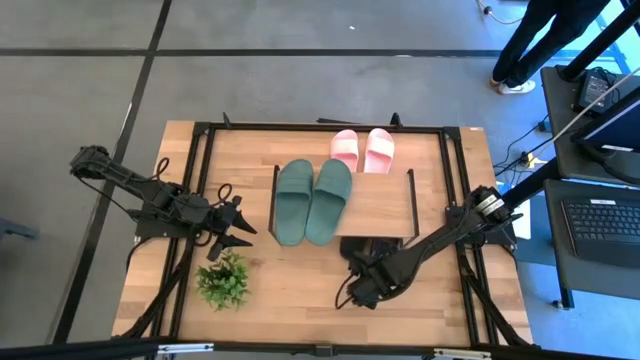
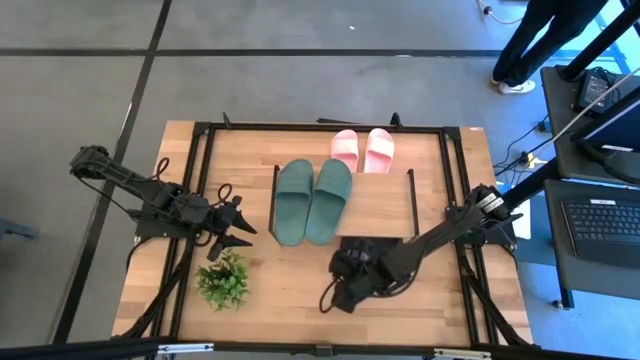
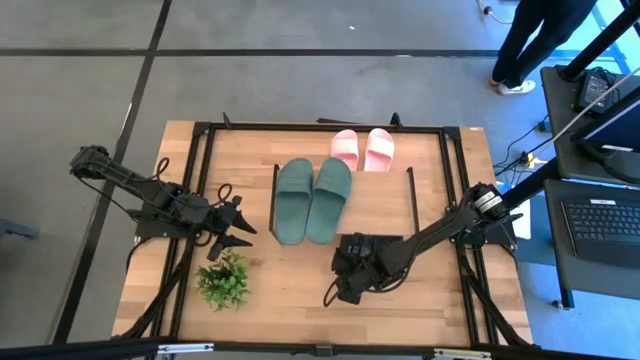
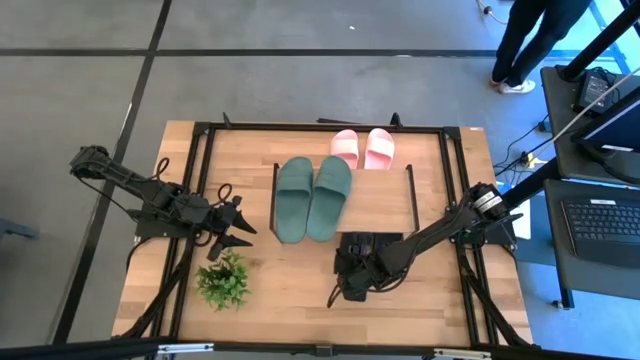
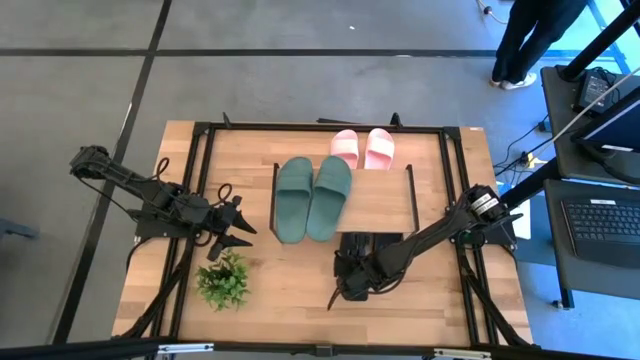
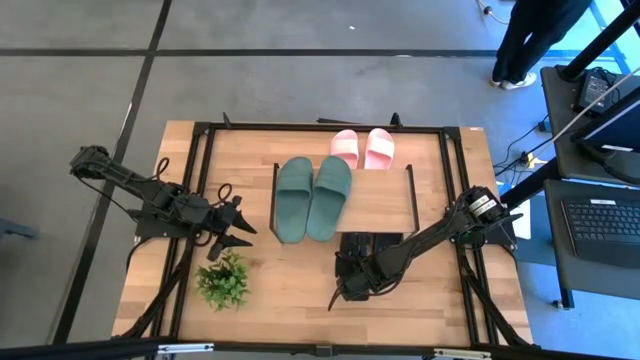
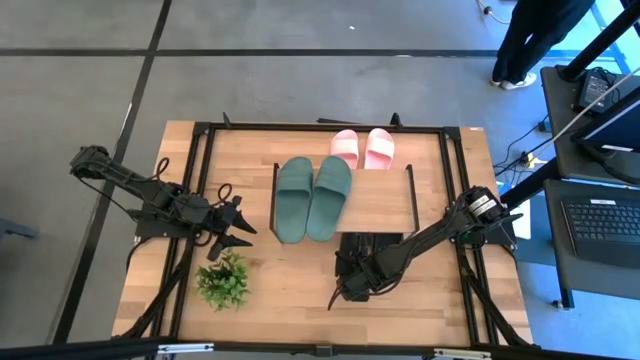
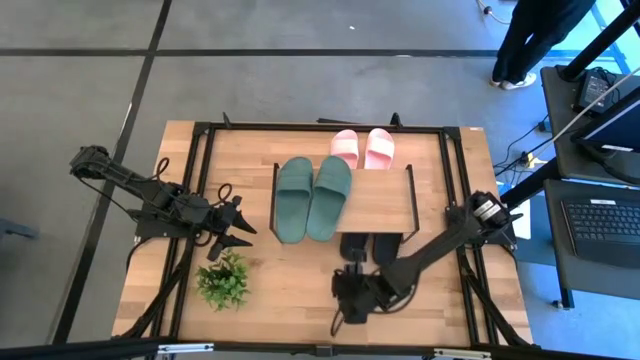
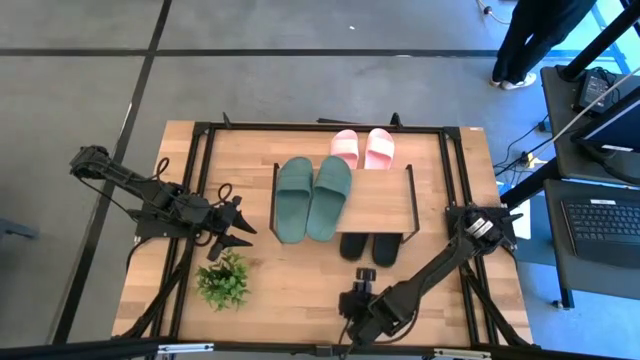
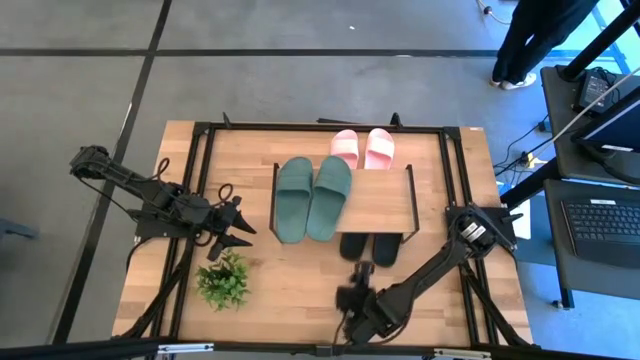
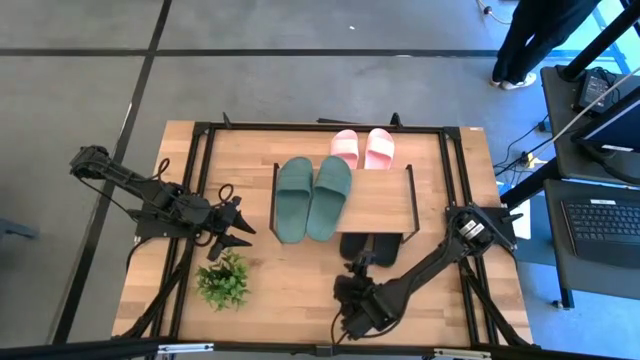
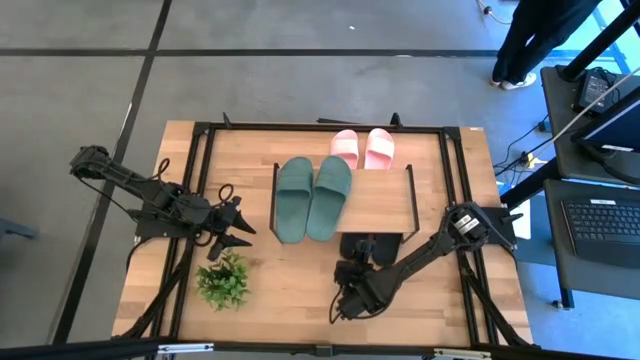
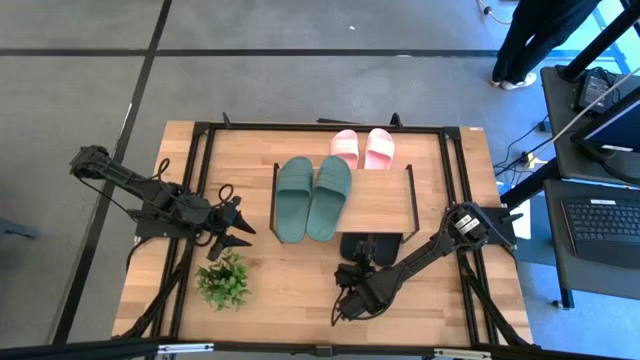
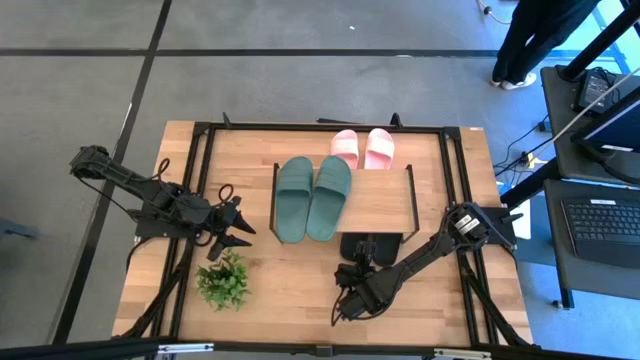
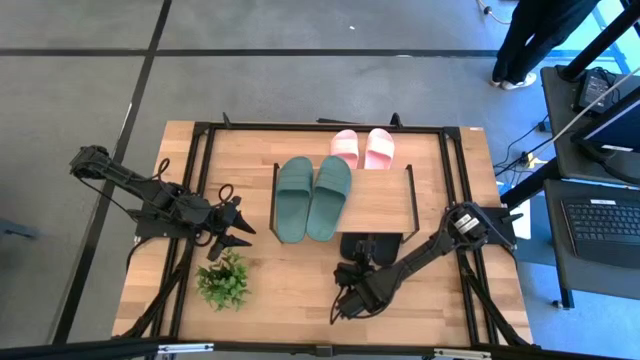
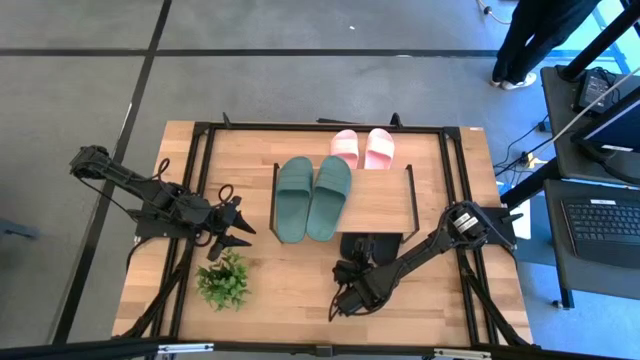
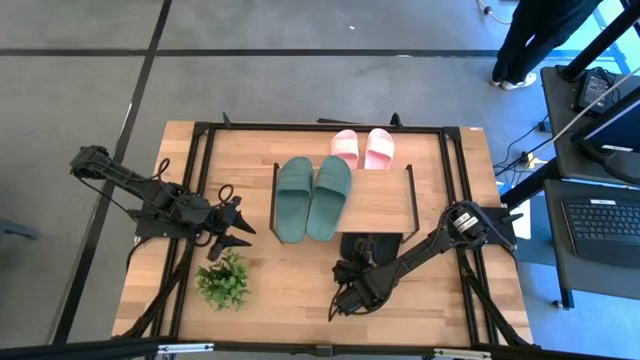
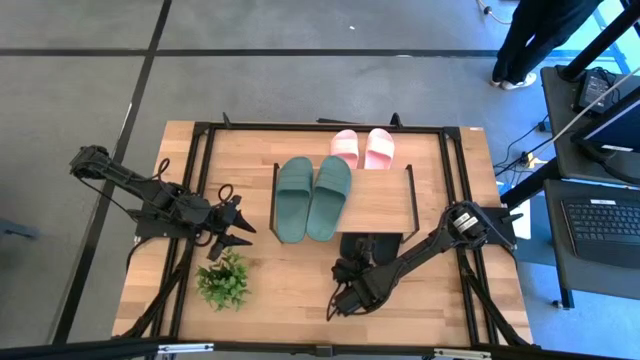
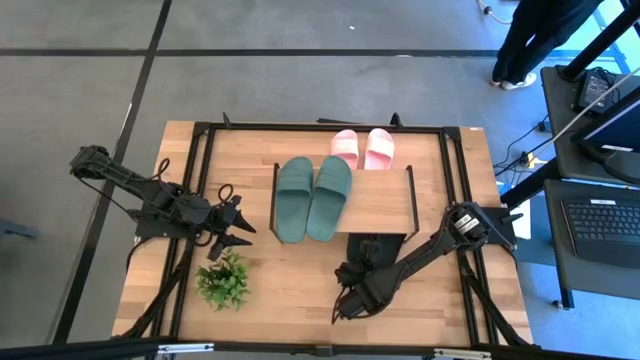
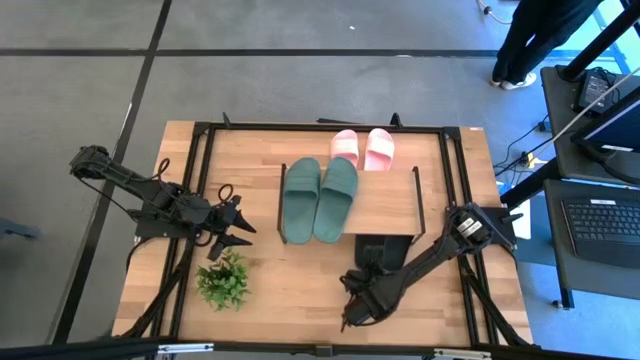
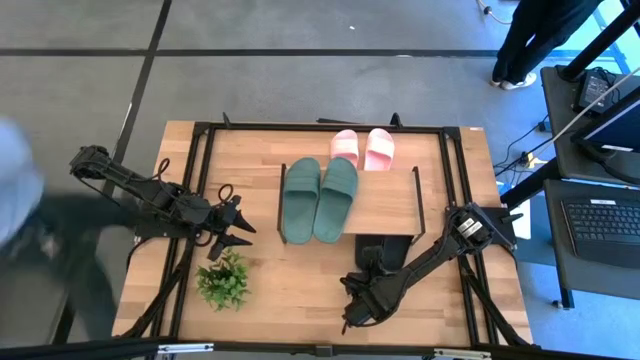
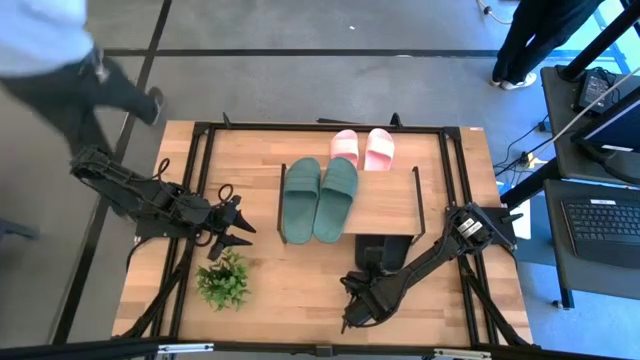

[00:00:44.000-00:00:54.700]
Task: Pick and place slides into the shelf
Adjust the left black slipper

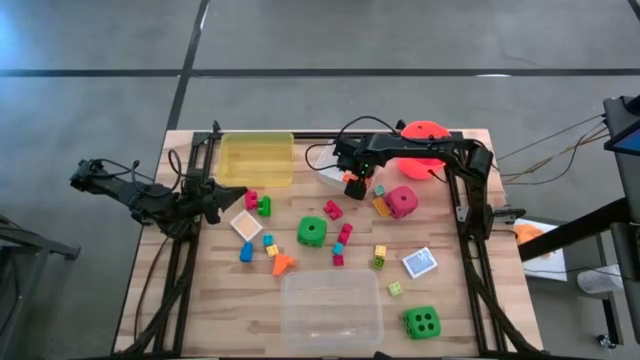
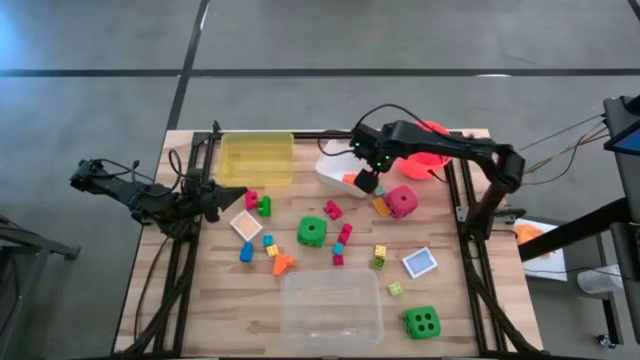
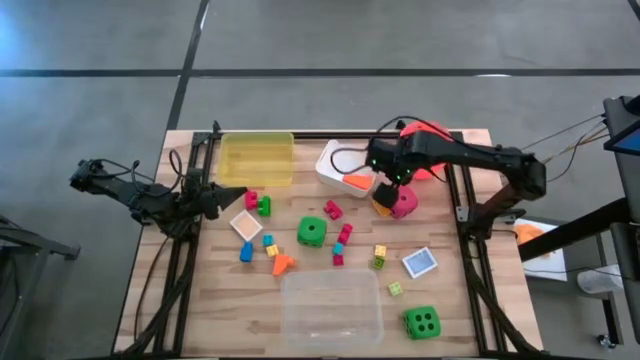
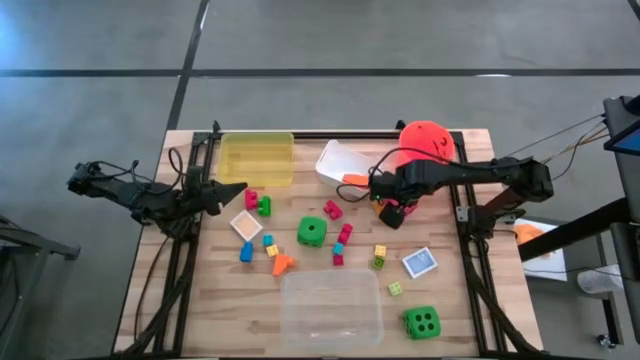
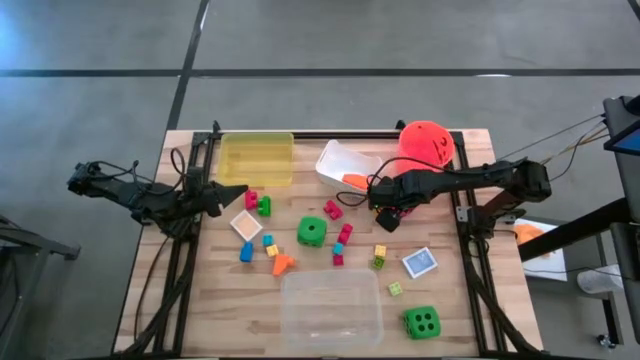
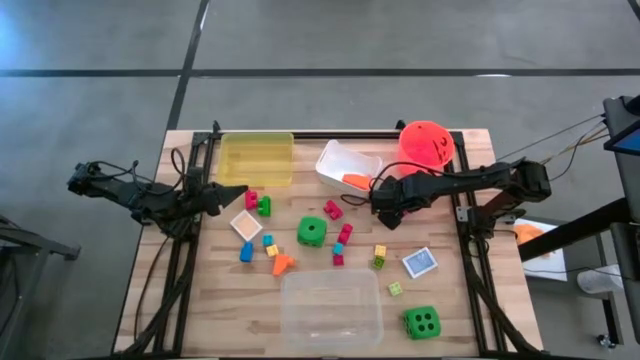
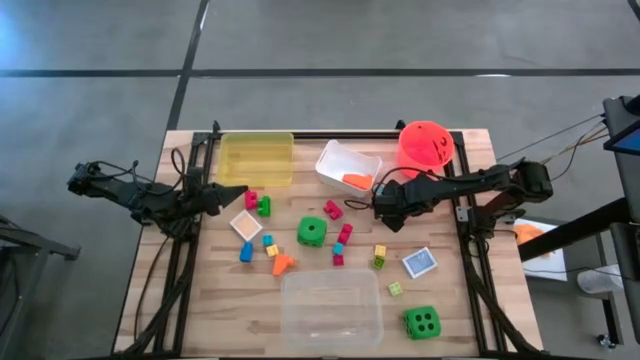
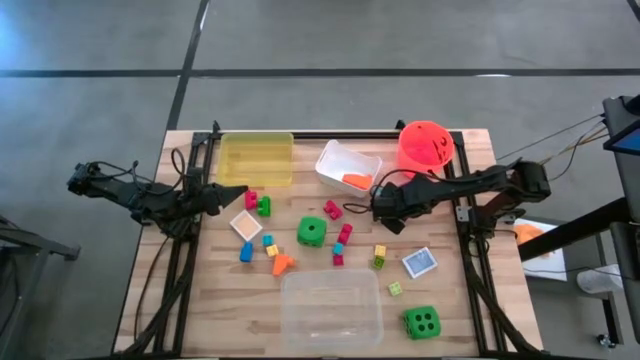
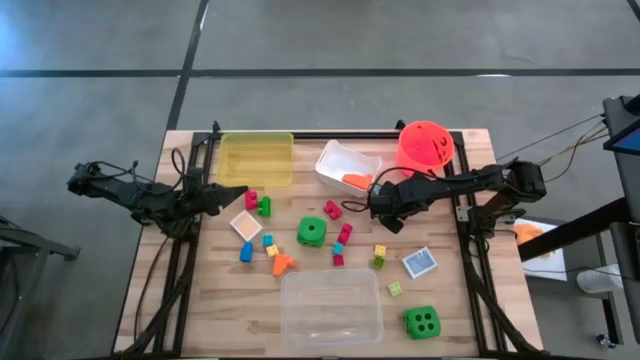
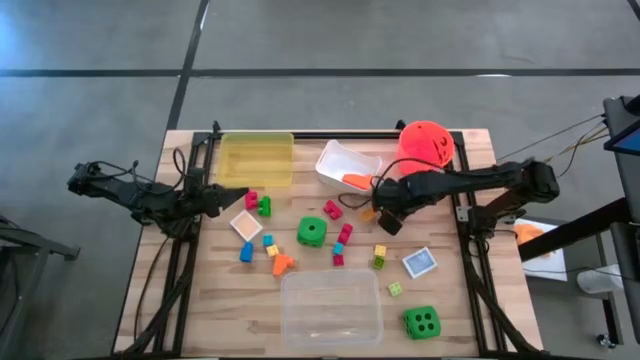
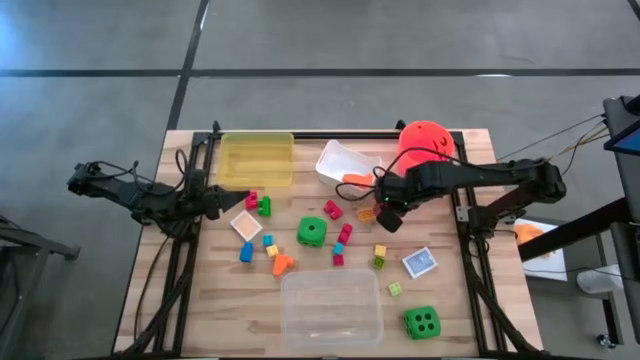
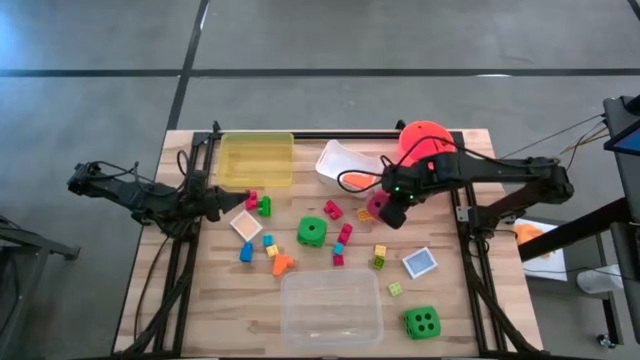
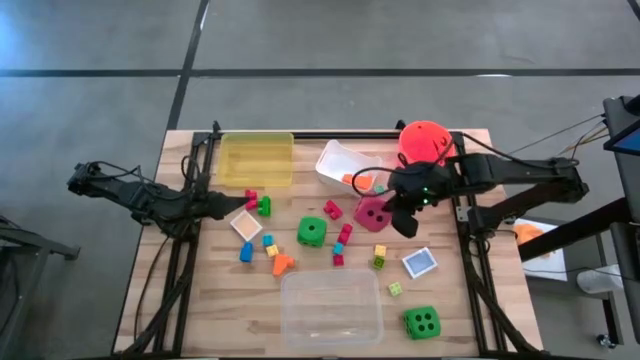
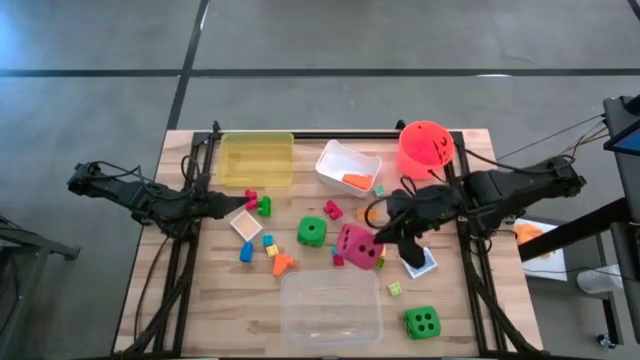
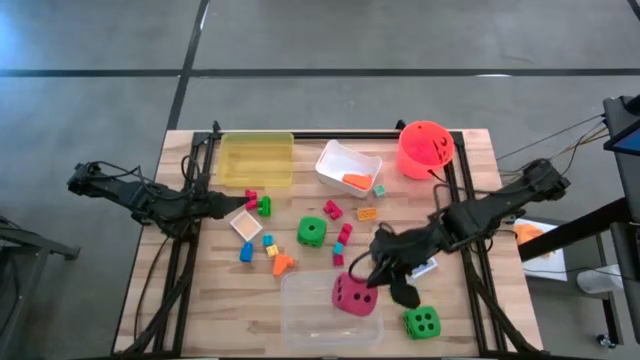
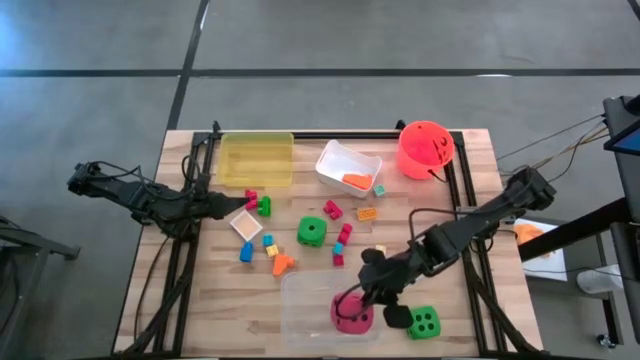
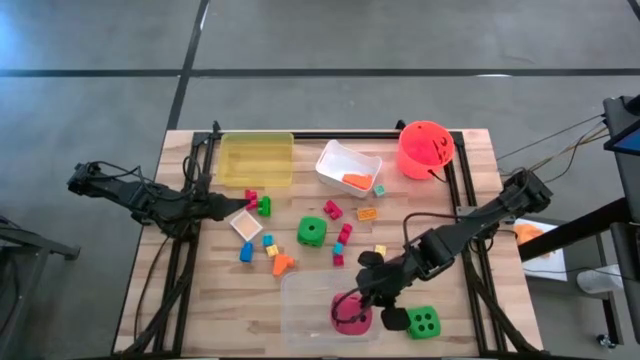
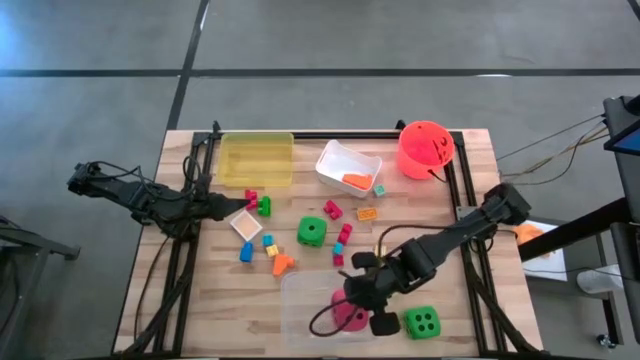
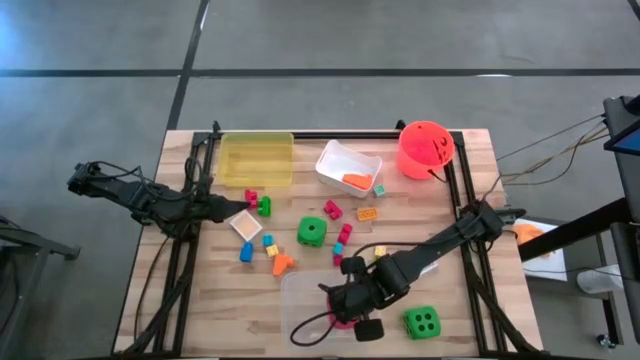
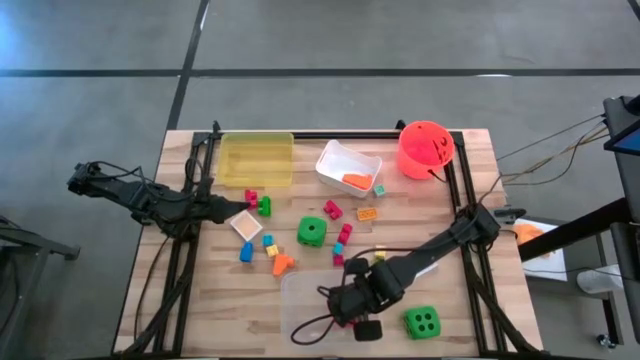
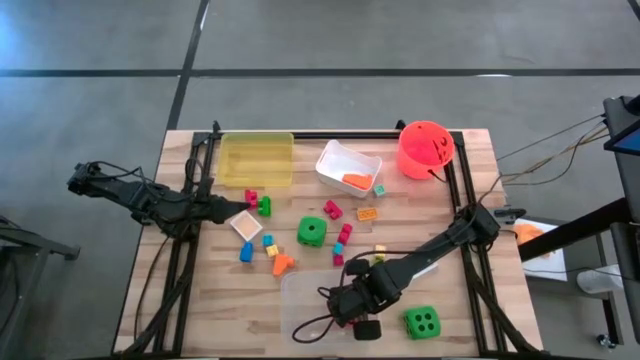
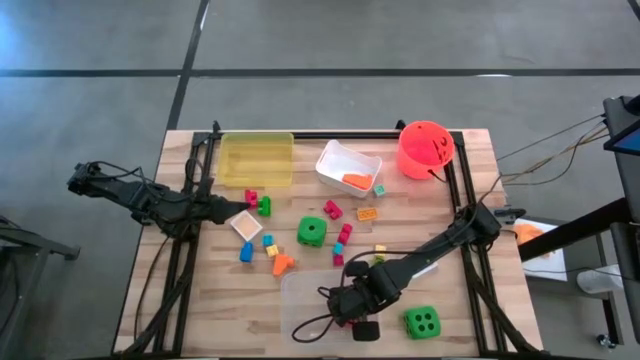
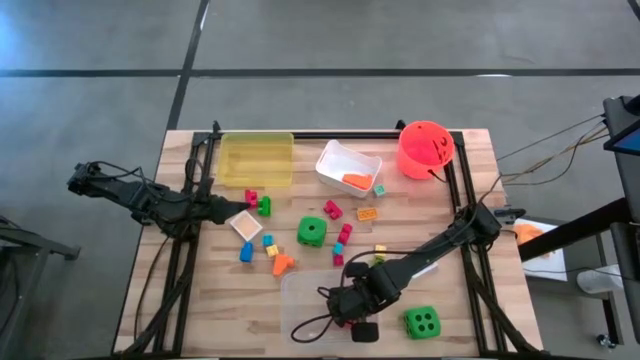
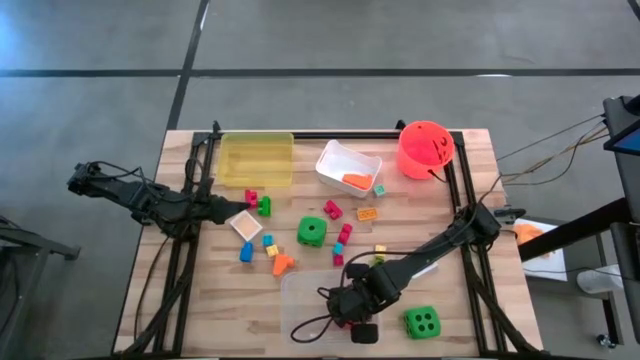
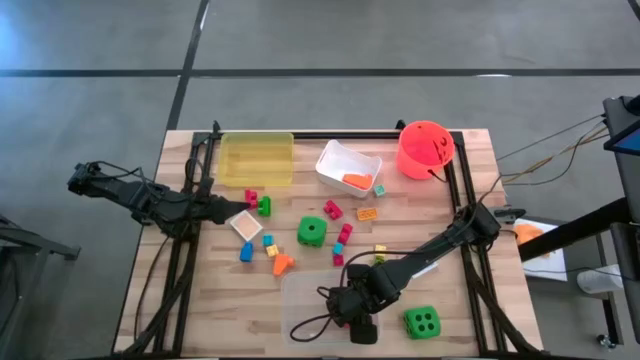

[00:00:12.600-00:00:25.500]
Task: Pick & Place Toys
Put the pink dice into the transparent bin
